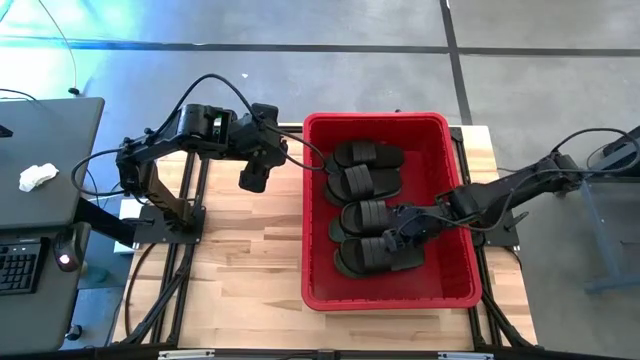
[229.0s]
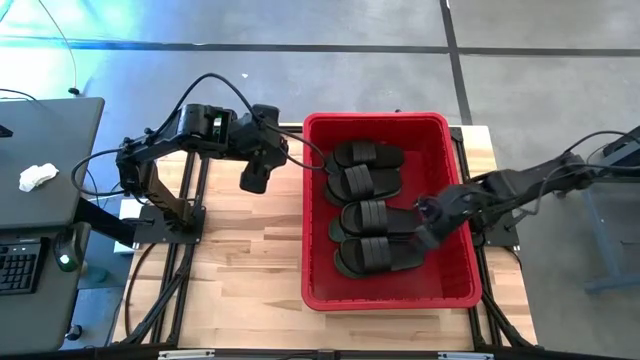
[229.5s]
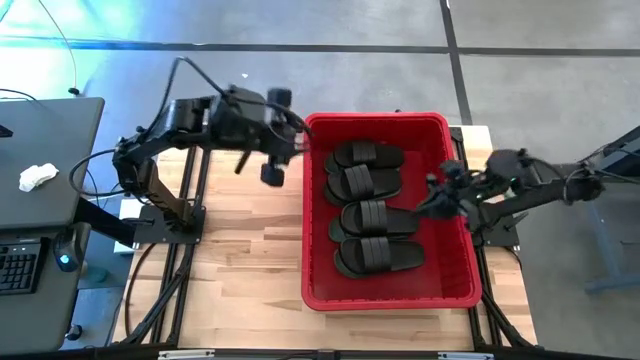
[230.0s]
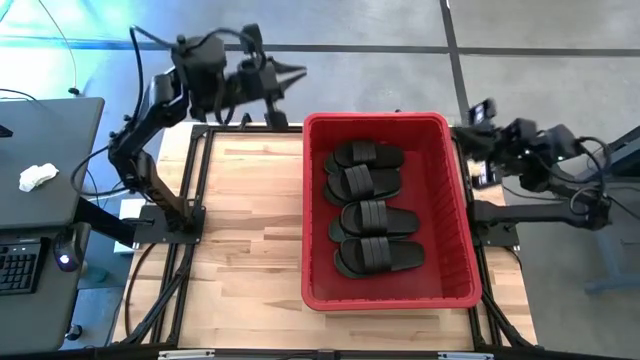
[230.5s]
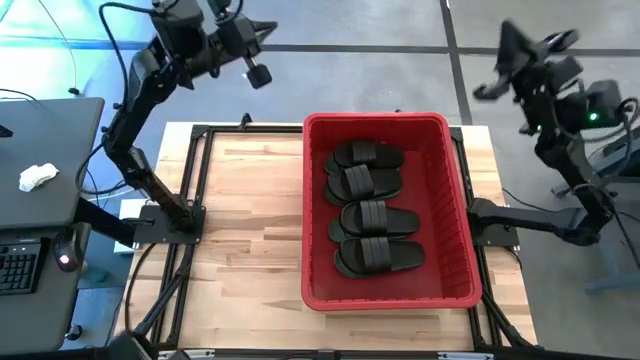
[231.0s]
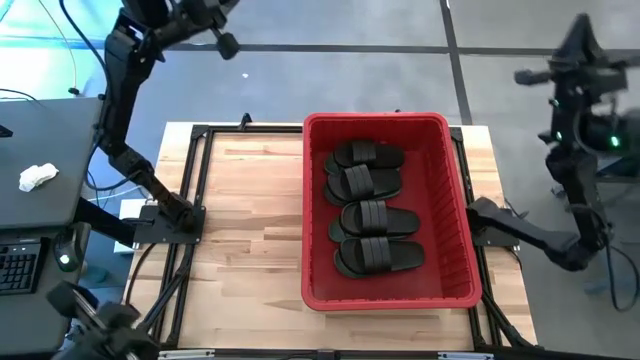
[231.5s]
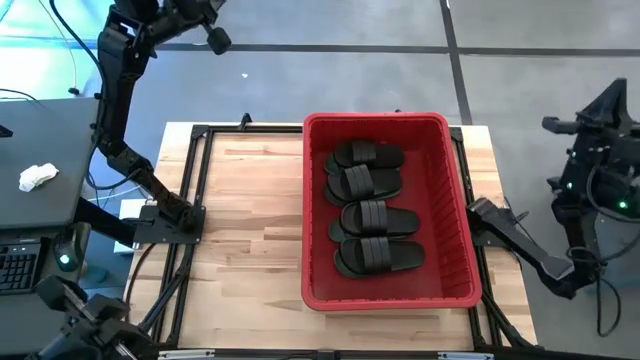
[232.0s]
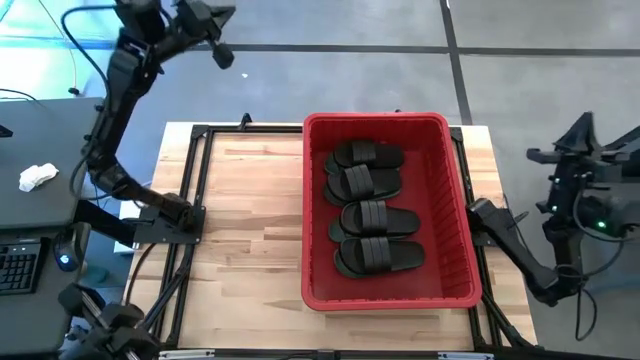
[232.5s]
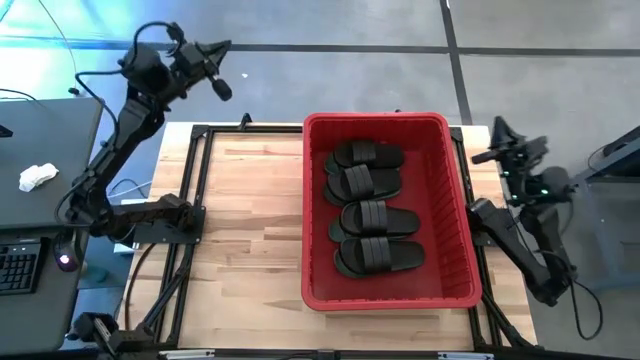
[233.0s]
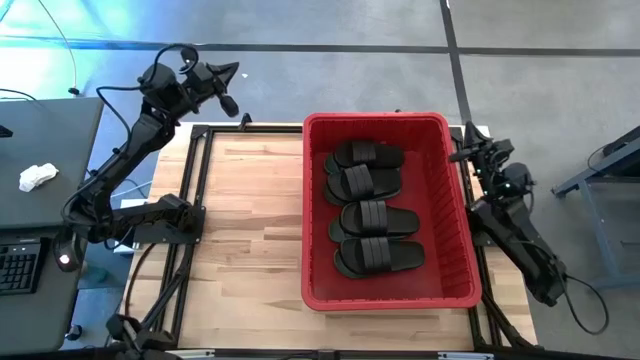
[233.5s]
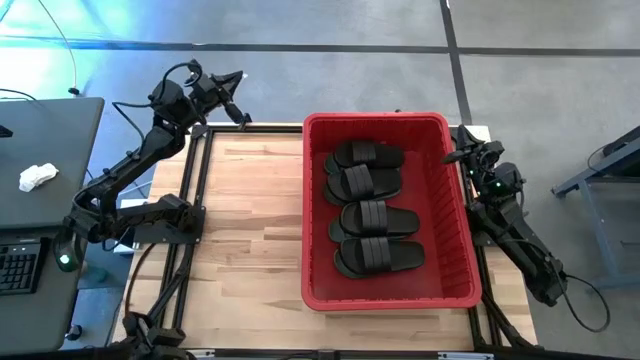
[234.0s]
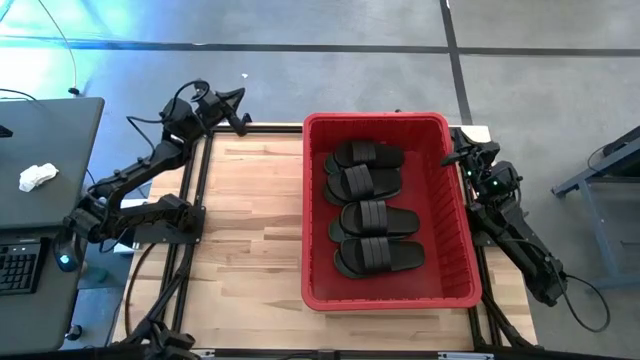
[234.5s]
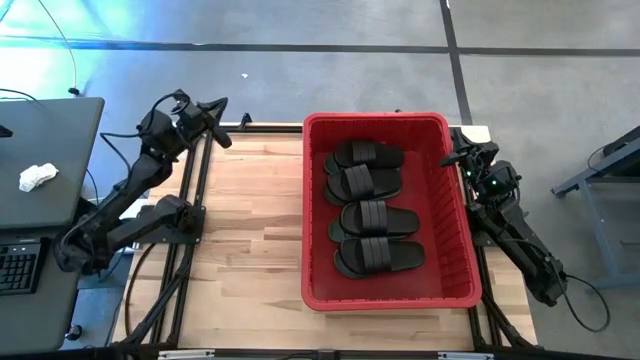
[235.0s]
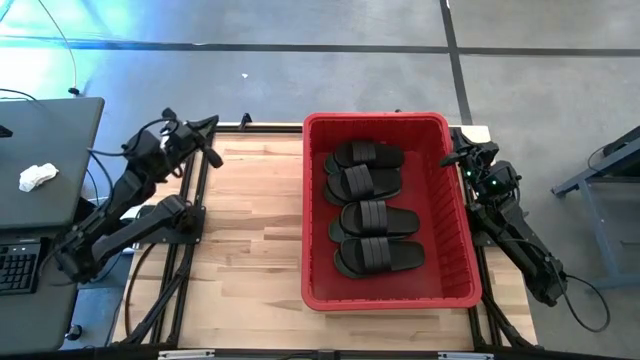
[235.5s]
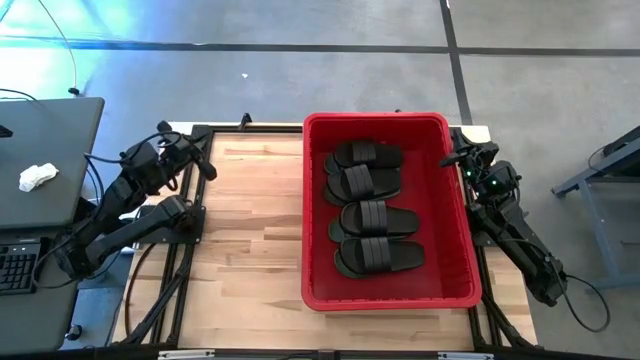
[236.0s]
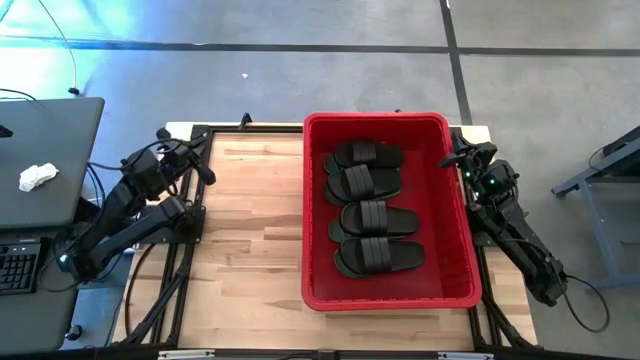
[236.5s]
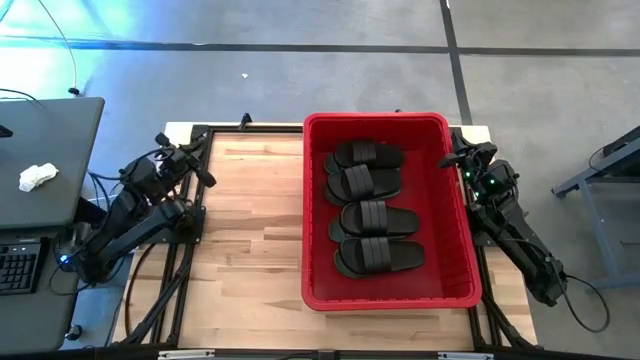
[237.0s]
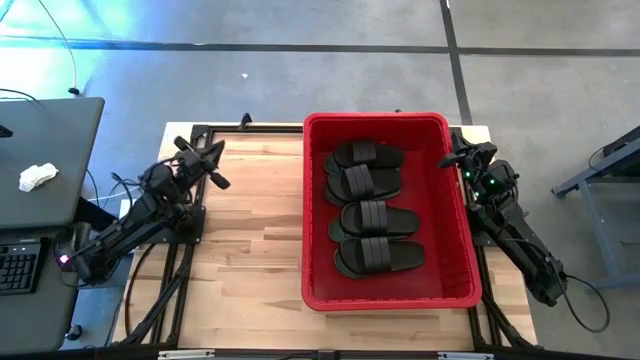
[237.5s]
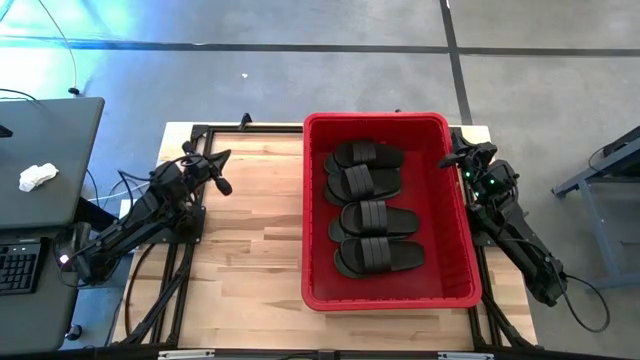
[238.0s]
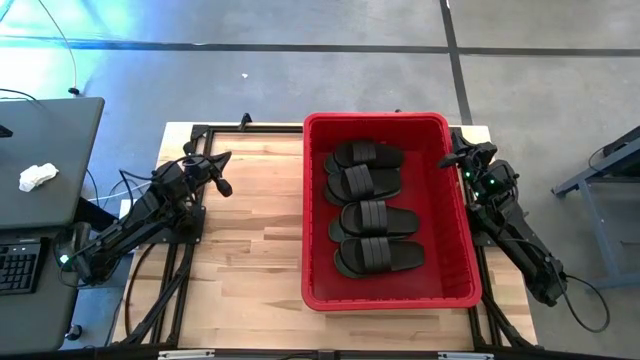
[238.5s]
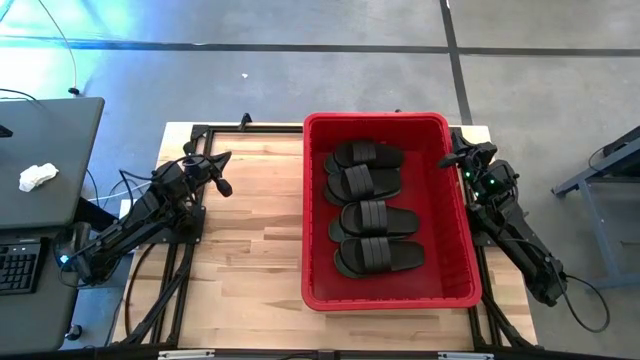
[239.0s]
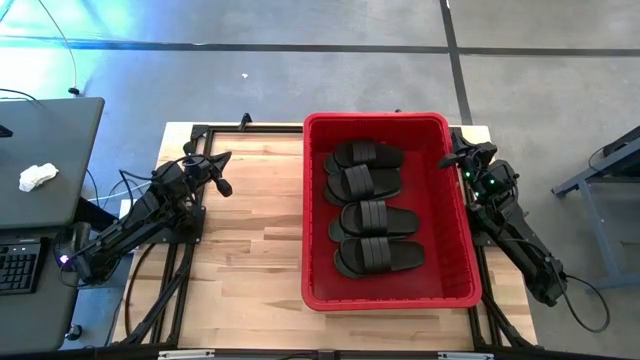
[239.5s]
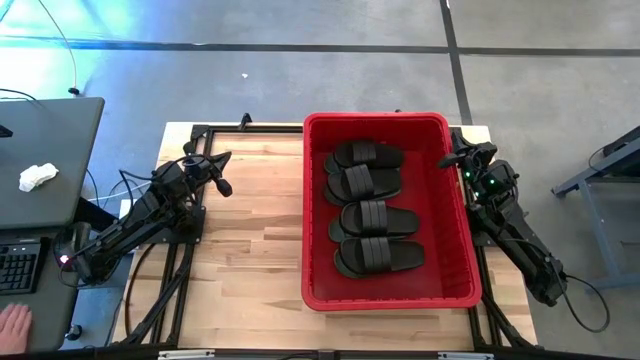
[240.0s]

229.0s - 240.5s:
Task: Pick and place slides into bin
Return to Home Position

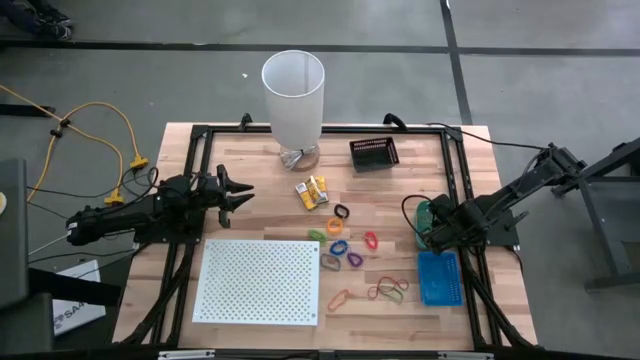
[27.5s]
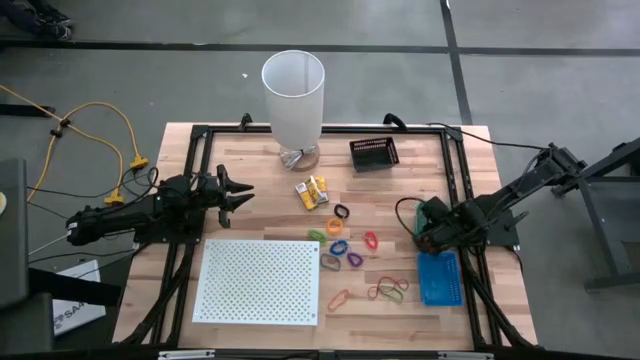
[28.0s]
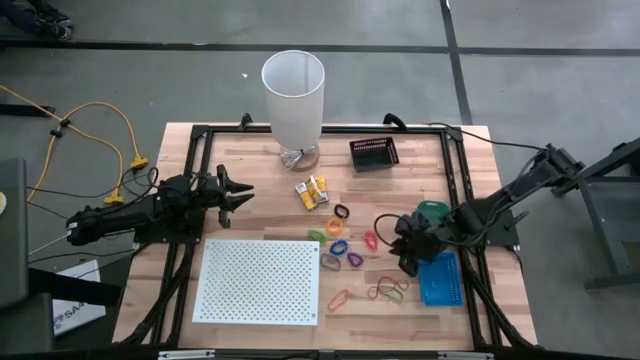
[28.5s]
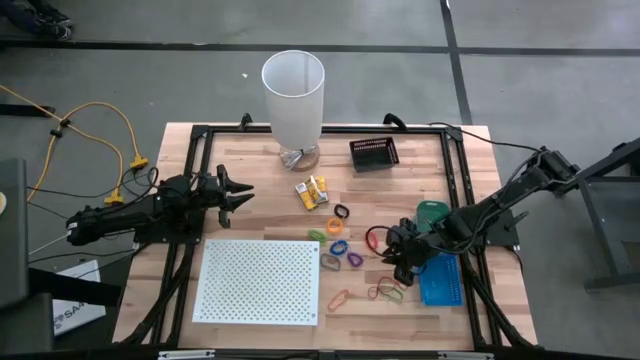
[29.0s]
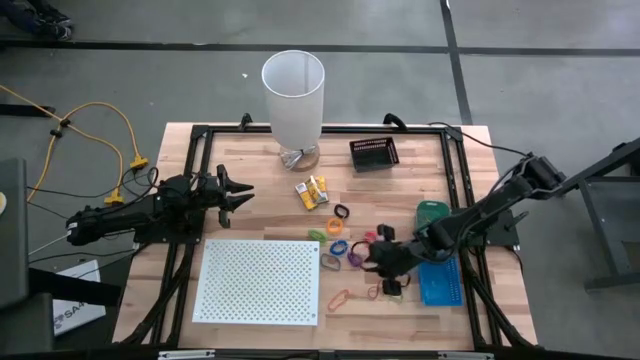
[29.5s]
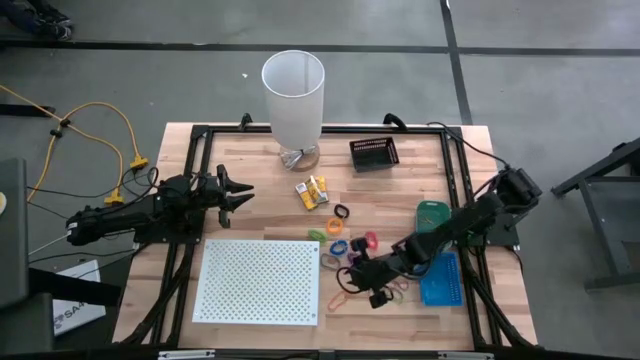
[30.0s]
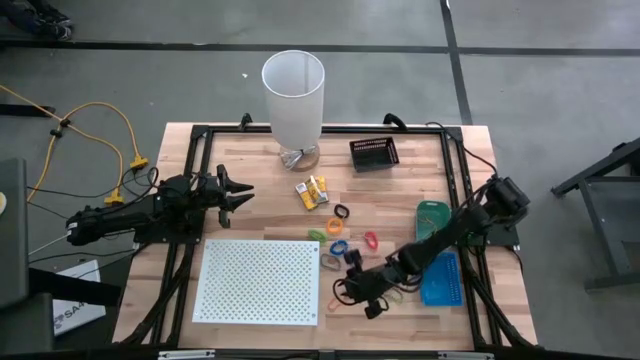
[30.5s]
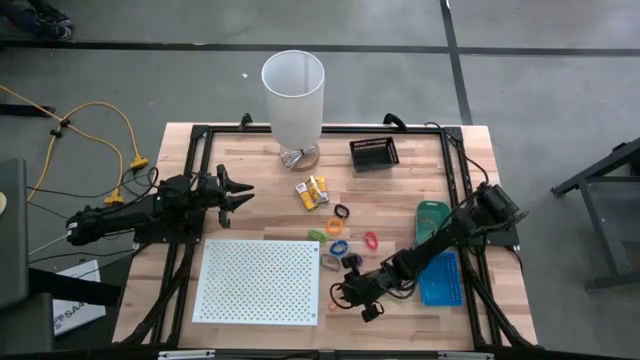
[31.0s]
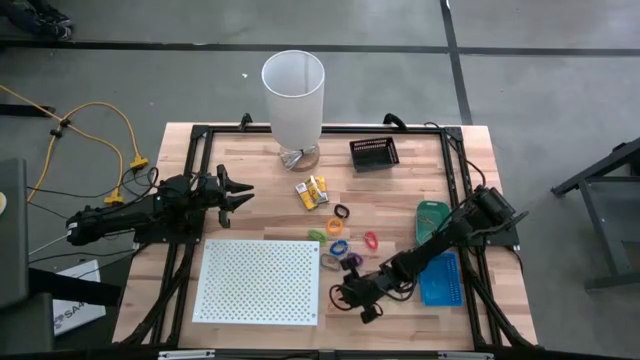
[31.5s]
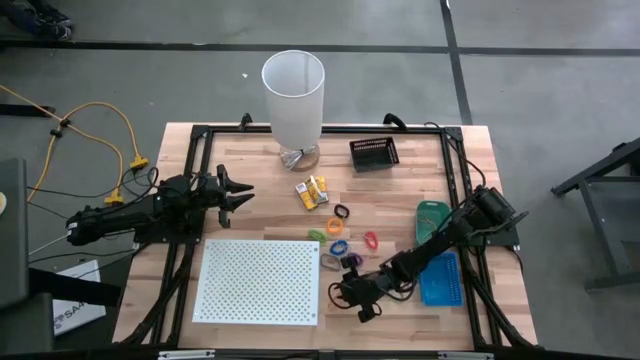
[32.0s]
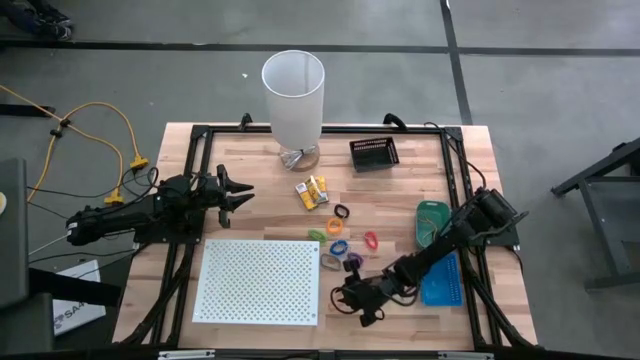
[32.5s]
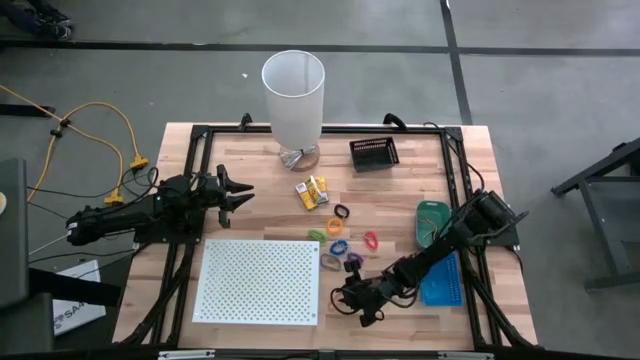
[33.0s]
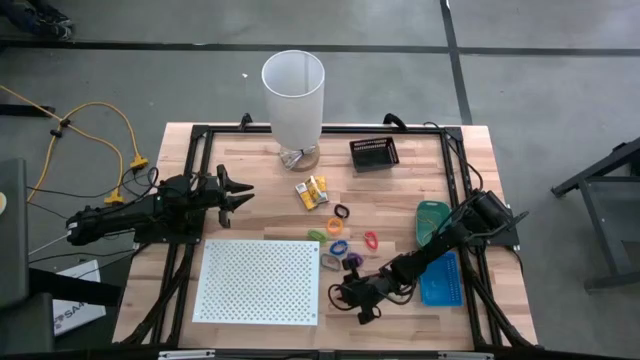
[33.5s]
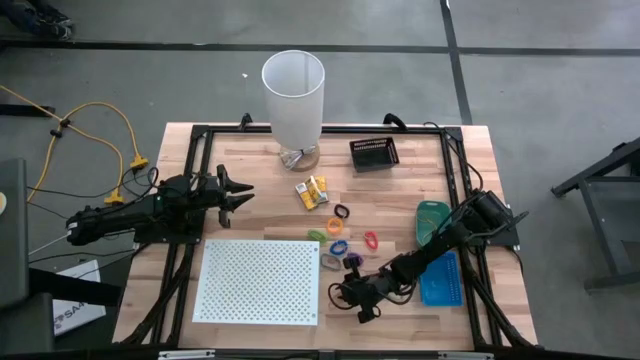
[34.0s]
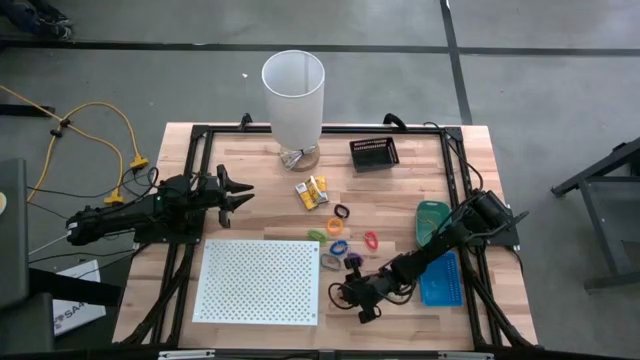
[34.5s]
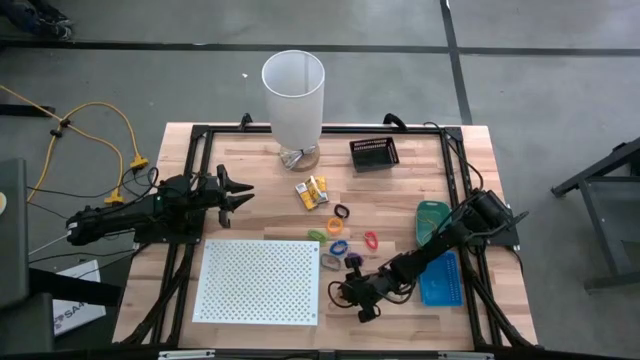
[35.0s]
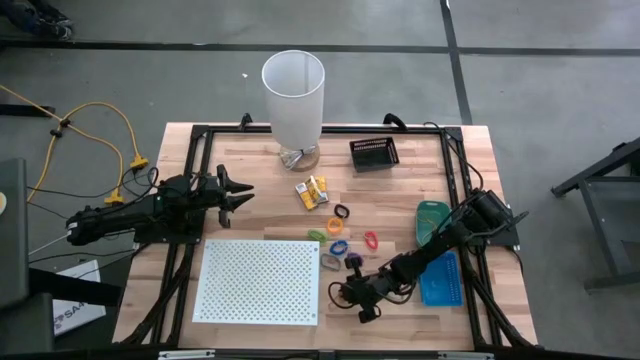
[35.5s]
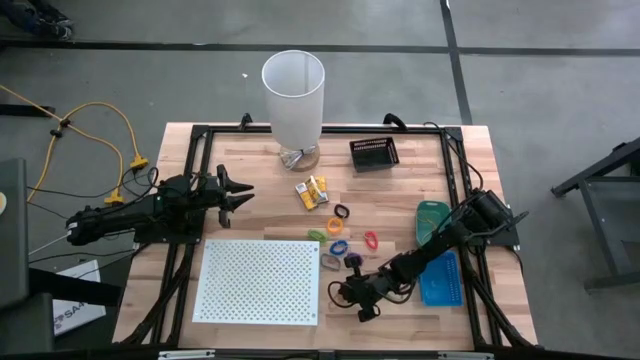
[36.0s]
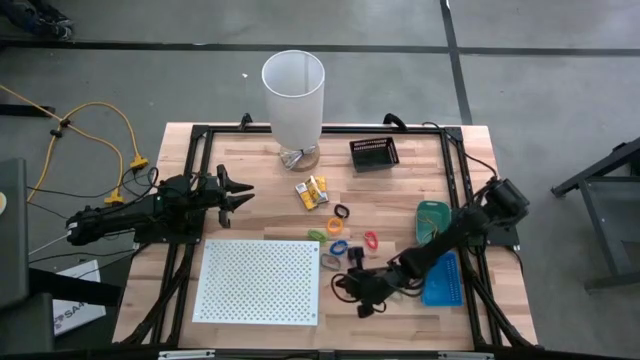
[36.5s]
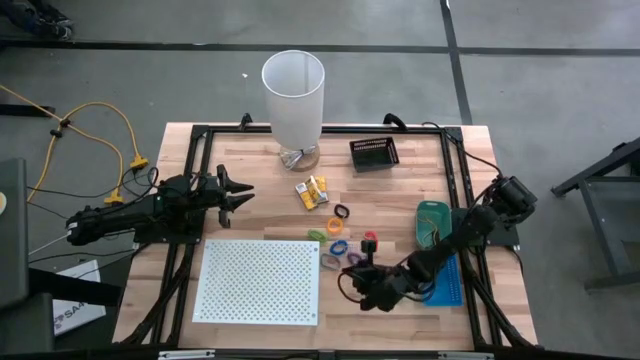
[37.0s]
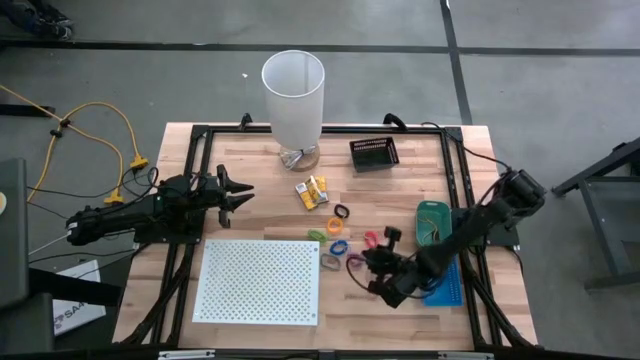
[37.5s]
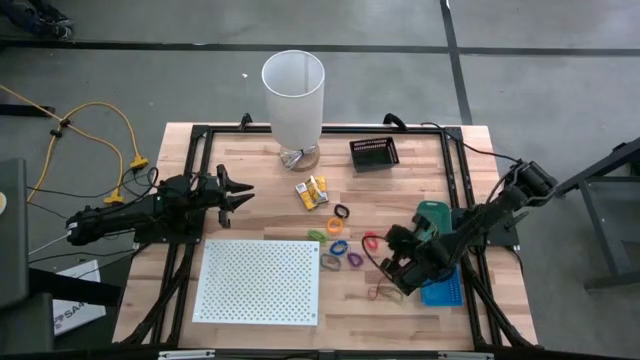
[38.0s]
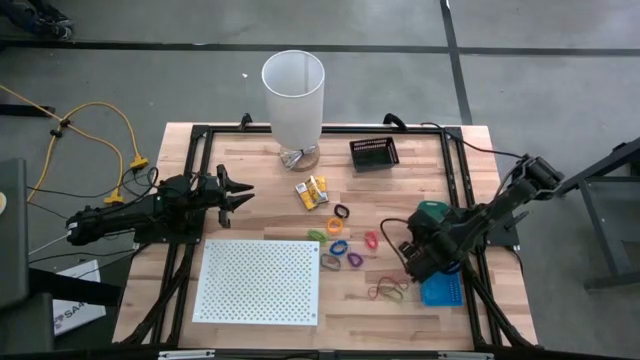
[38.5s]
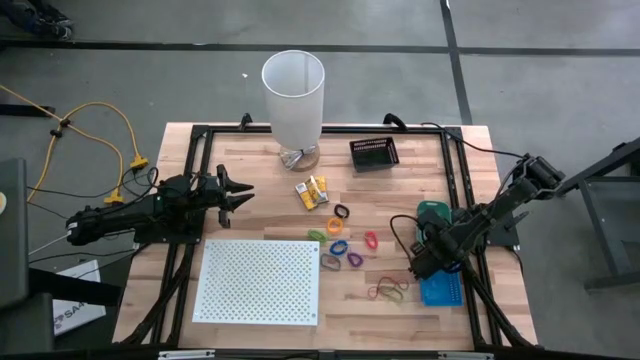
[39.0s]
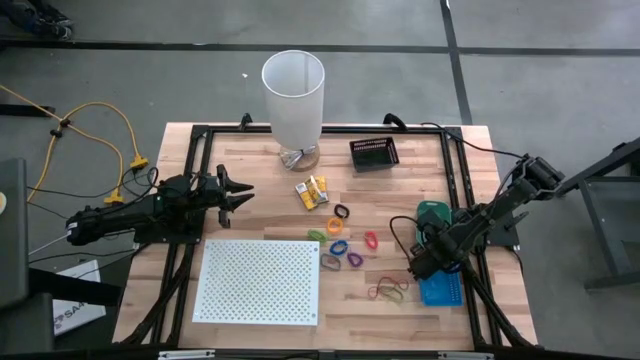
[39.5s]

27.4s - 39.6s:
Task: Pick & Place Office Desk Supplies
Put the orange rubber band into the green bin
